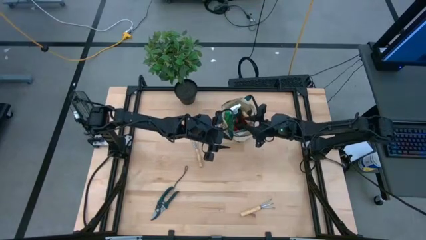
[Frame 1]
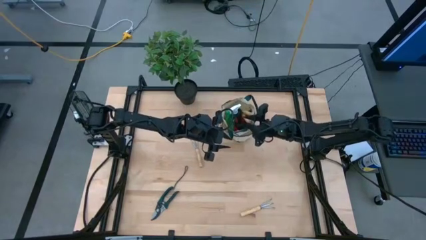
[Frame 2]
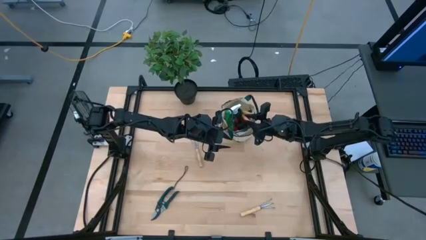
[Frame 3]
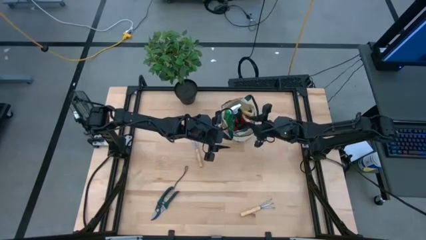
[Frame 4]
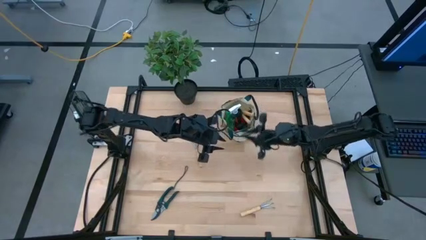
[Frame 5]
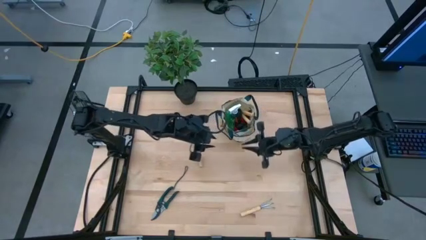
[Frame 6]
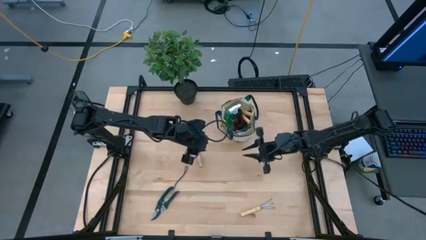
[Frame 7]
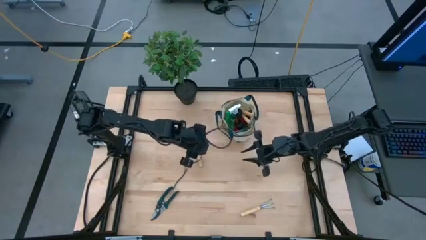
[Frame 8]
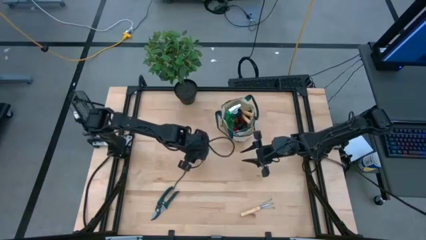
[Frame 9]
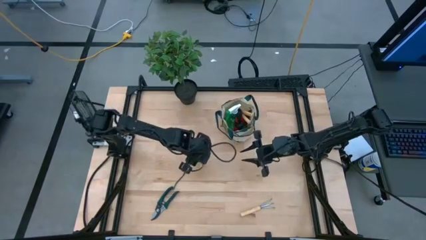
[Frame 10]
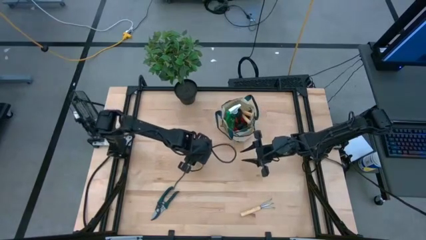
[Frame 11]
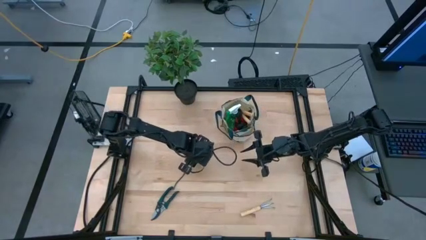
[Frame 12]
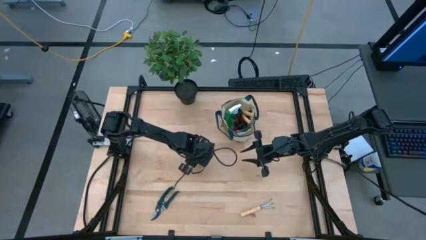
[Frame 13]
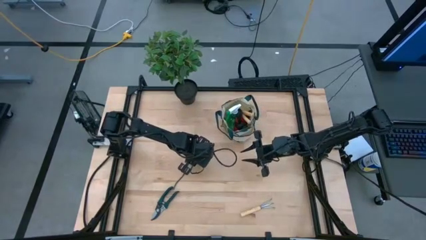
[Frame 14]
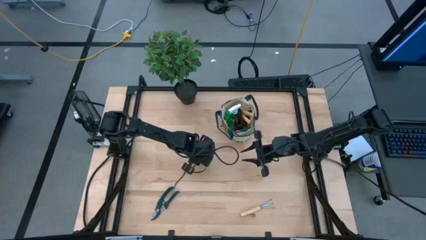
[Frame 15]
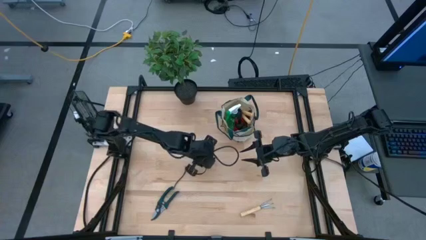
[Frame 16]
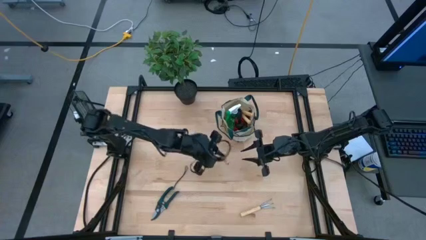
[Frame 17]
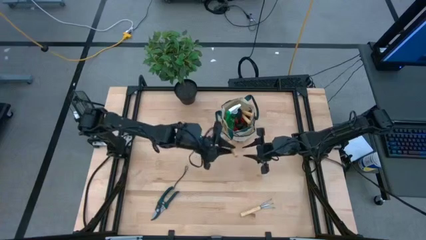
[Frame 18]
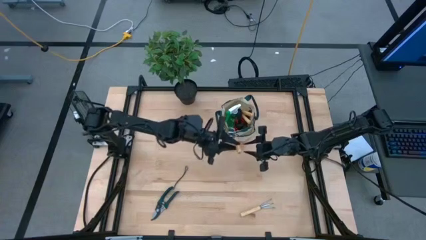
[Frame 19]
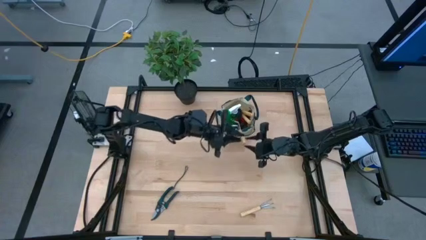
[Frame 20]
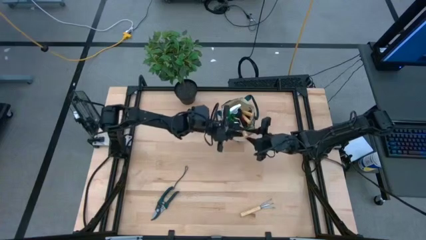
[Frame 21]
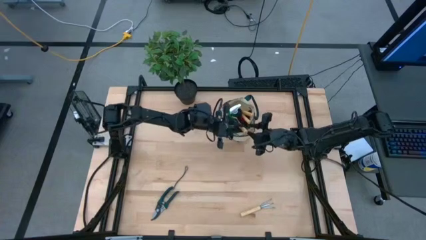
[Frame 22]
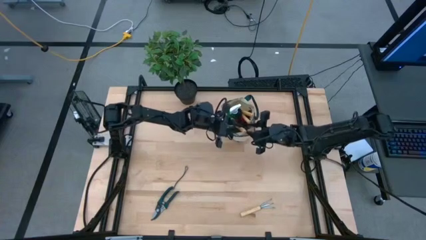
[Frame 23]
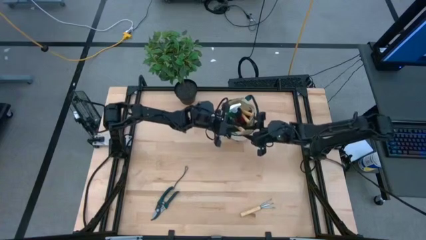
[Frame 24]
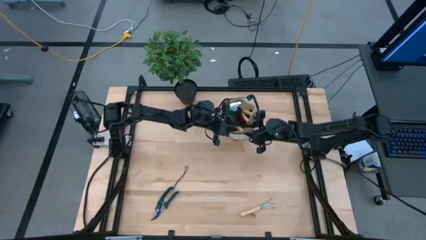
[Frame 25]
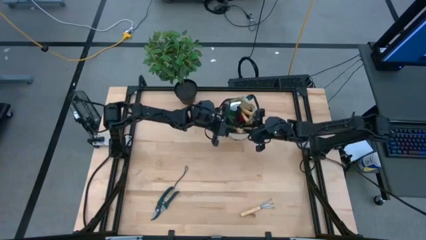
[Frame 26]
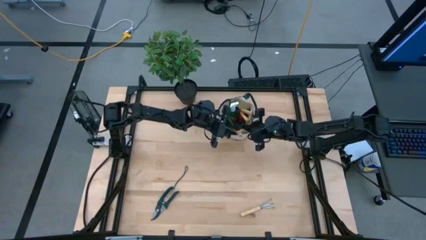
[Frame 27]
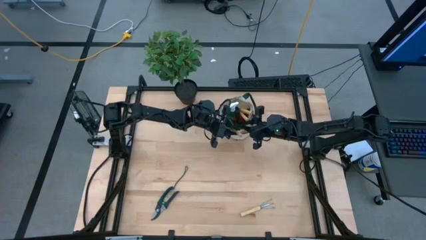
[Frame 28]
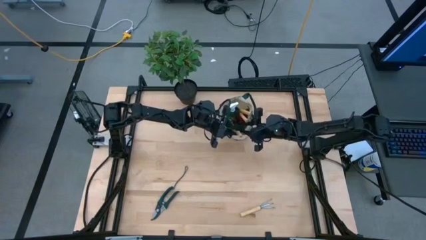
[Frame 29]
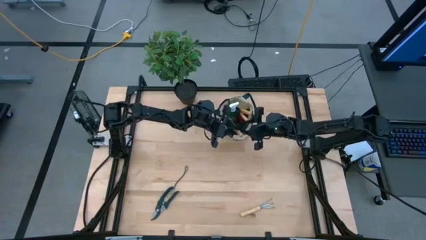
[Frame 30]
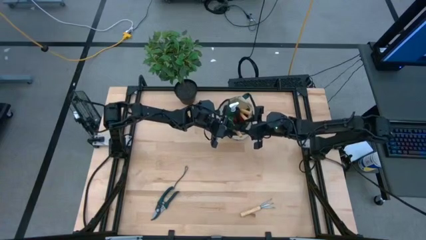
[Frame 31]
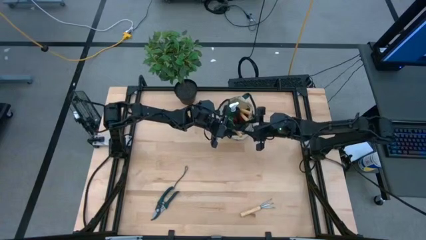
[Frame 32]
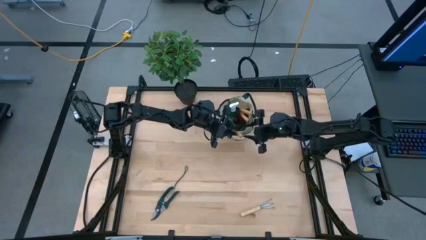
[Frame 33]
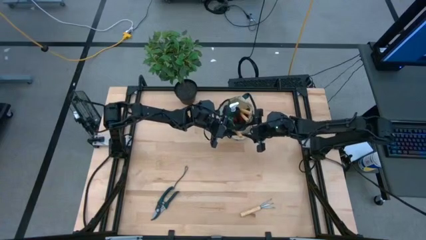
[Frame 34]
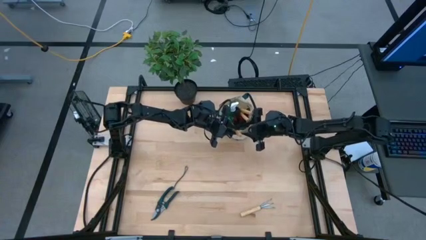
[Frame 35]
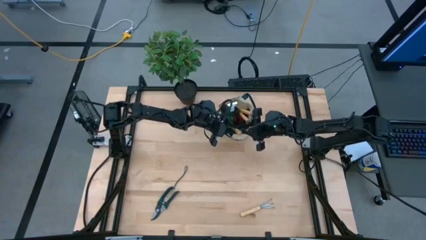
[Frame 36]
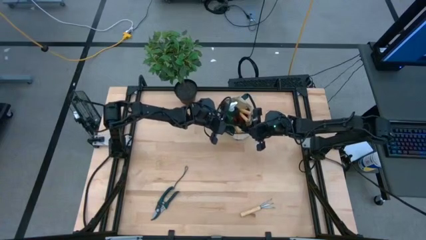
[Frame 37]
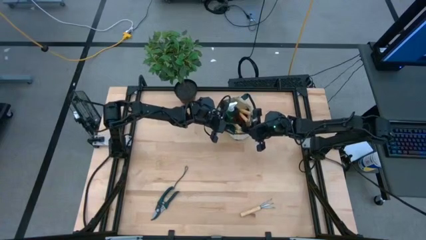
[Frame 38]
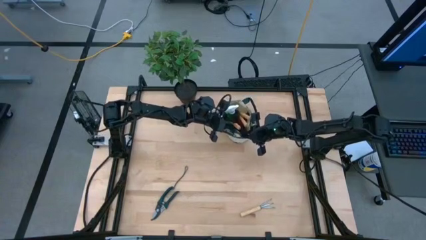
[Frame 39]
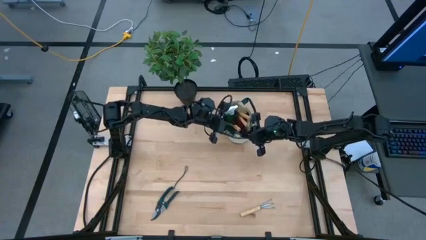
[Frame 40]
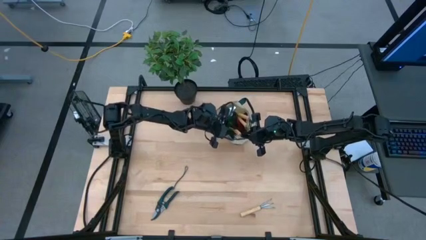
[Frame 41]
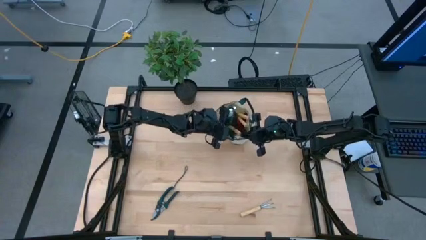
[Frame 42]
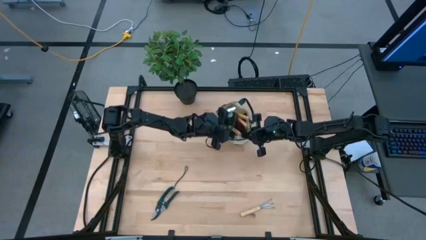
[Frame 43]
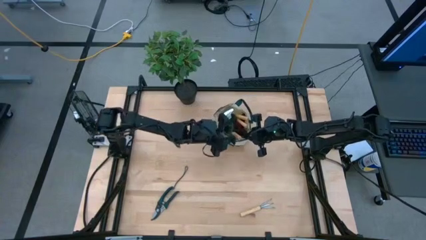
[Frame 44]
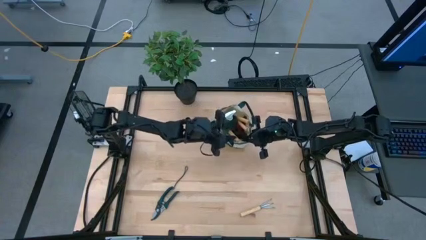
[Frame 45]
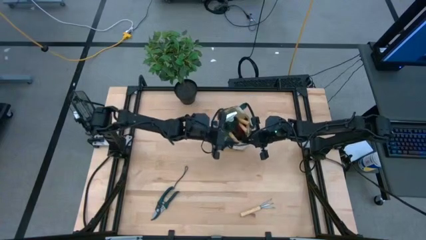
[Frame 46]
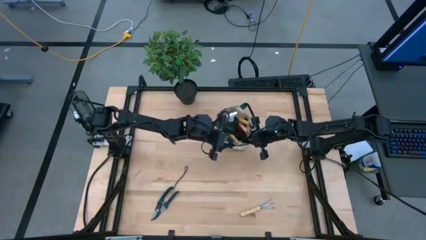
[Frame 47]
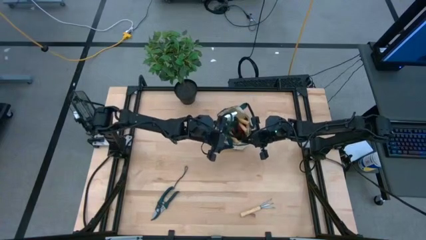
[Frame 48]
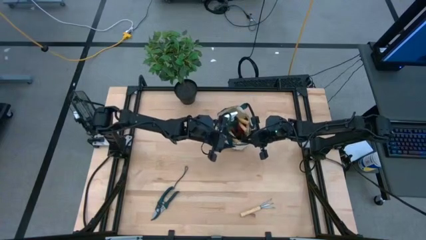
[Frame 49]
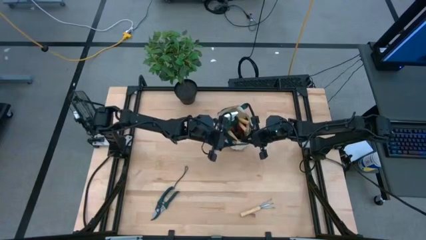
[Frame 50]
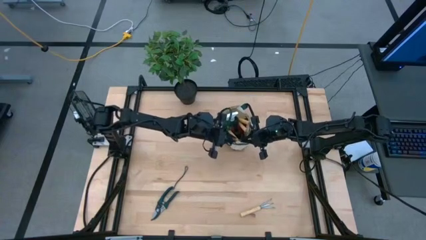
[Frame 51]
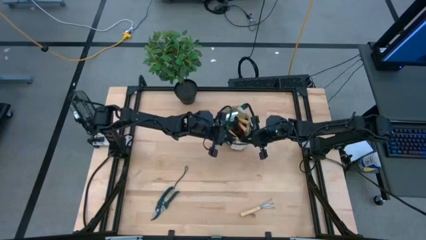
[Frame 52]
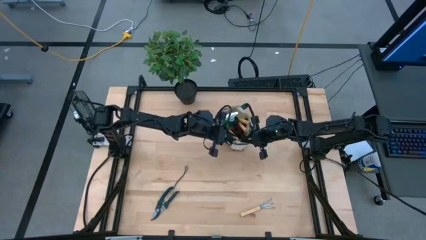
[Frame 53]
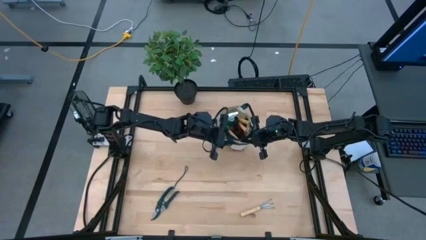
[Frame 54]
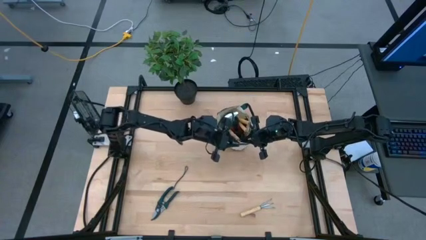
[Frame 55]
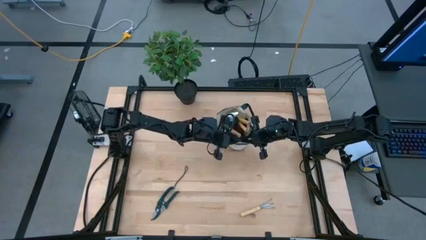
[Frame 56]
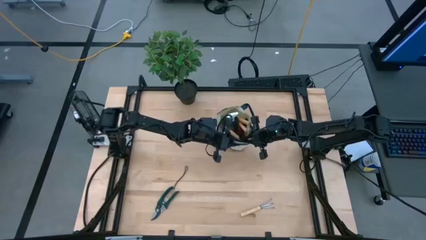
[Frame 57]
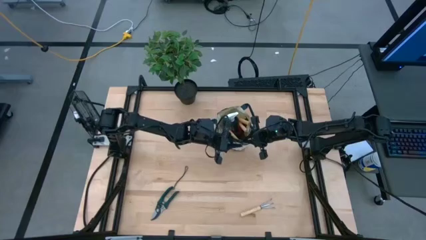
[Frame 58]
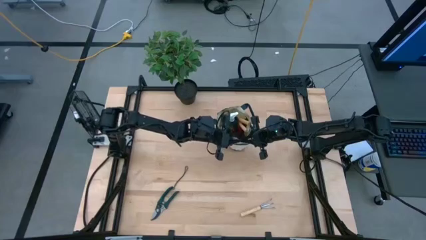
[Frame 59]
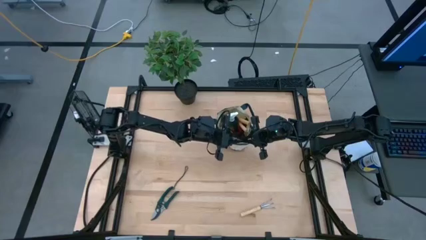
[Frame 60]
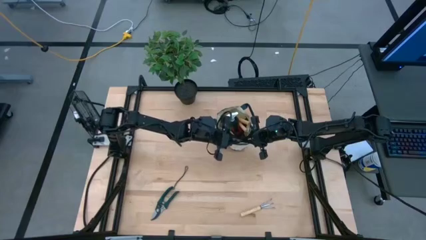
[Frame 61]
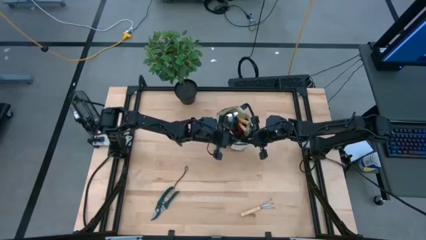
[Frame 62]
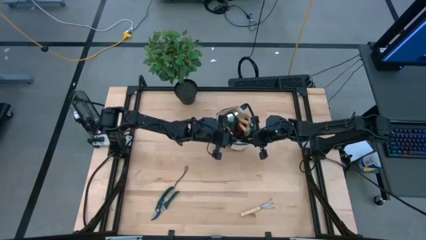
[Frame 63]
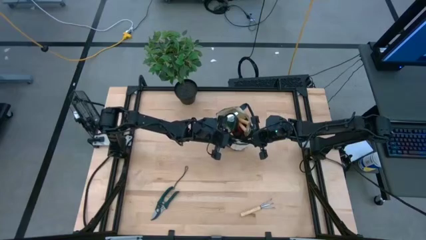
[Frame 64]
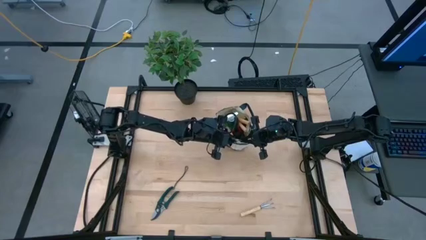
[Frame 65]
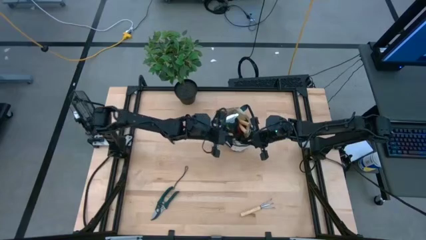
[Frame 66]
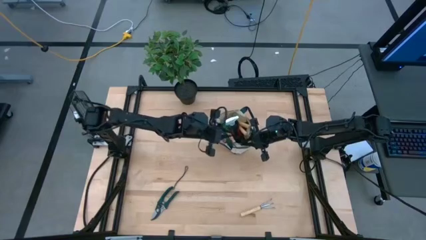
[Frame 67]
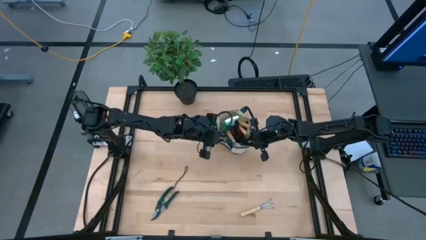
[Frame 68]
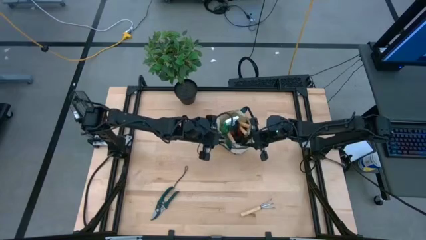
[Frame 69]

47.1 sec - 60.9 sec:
Task: Pick & Place Garden tools in Gardening bag
Put the brown hand rake into the light brown gardening bag
